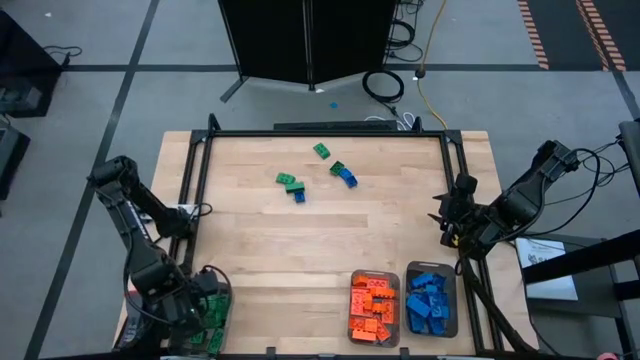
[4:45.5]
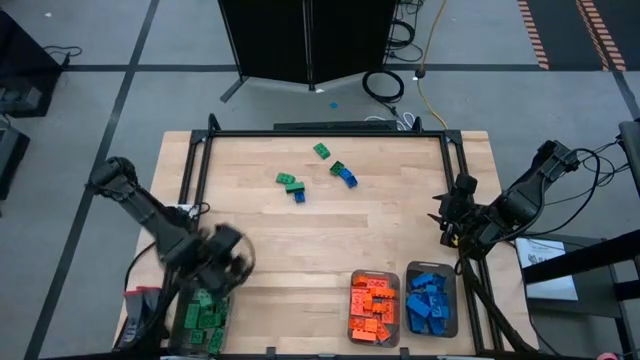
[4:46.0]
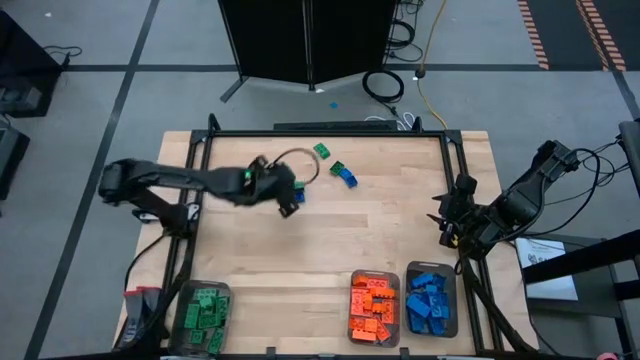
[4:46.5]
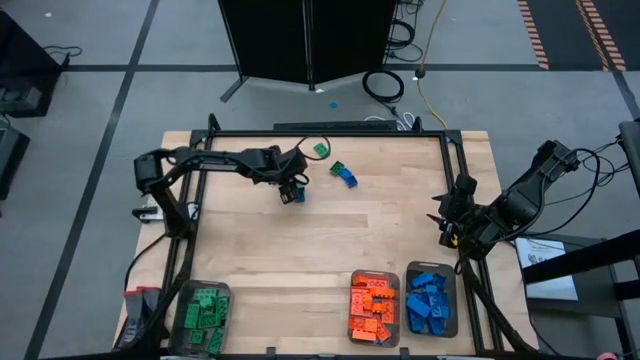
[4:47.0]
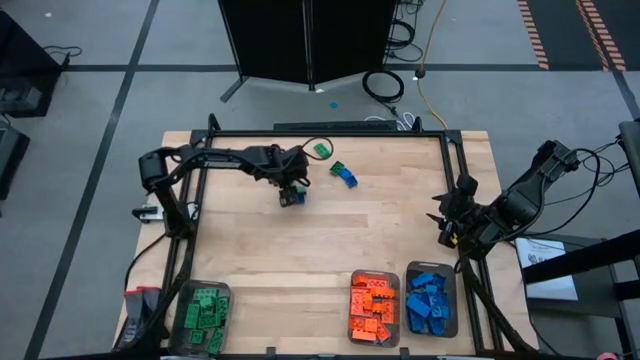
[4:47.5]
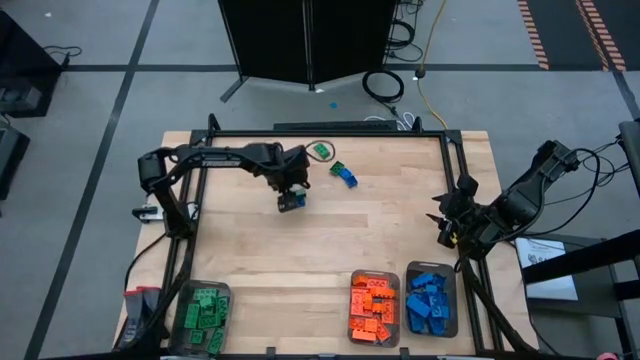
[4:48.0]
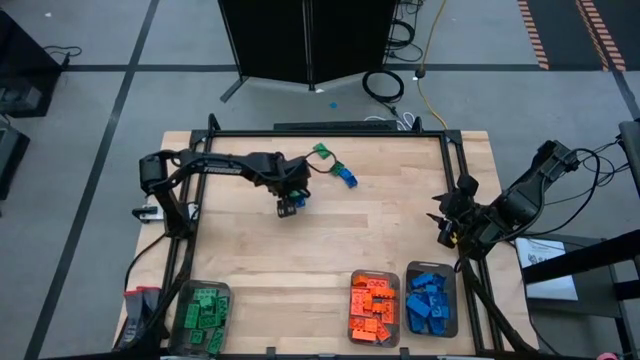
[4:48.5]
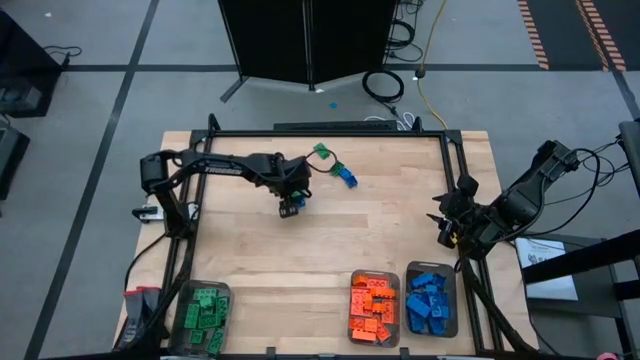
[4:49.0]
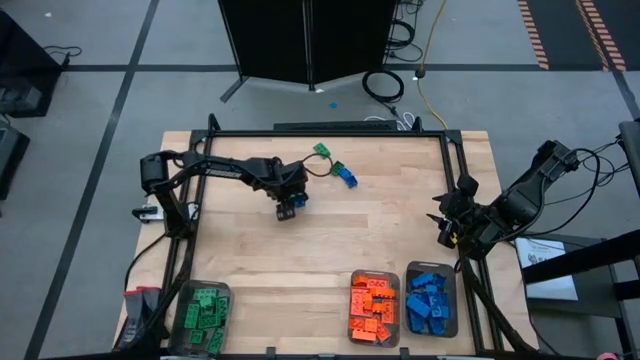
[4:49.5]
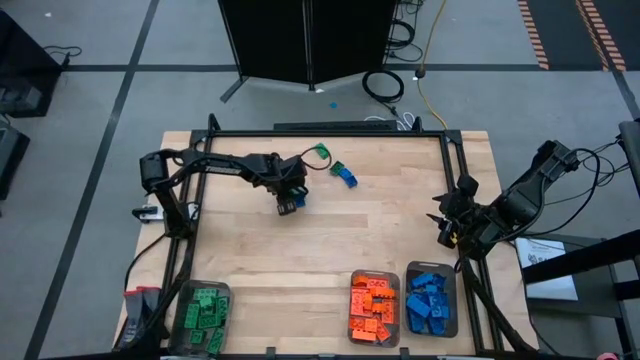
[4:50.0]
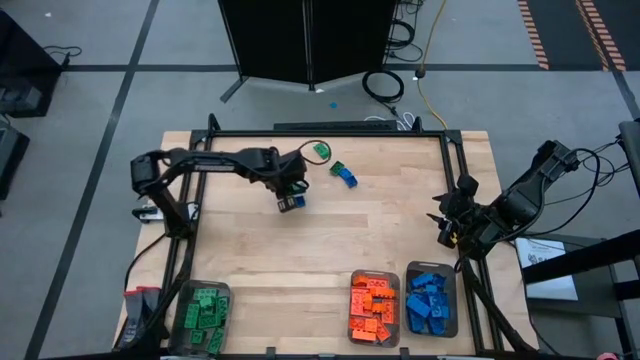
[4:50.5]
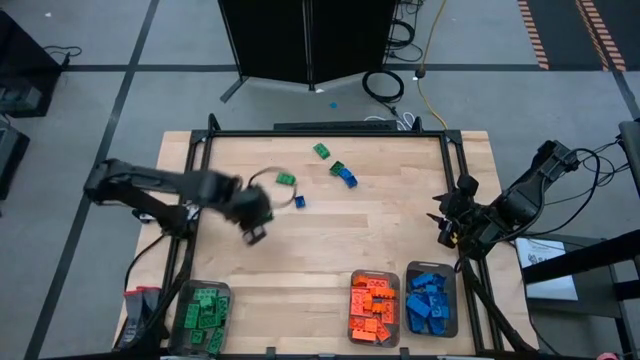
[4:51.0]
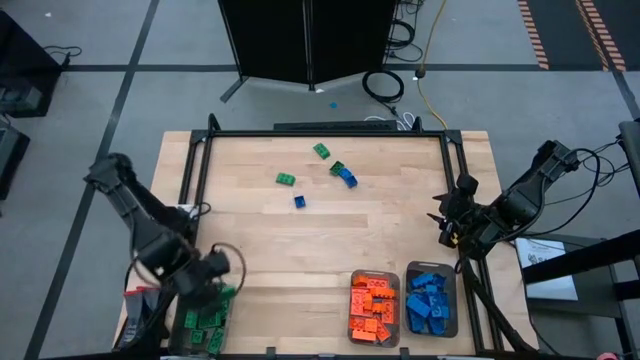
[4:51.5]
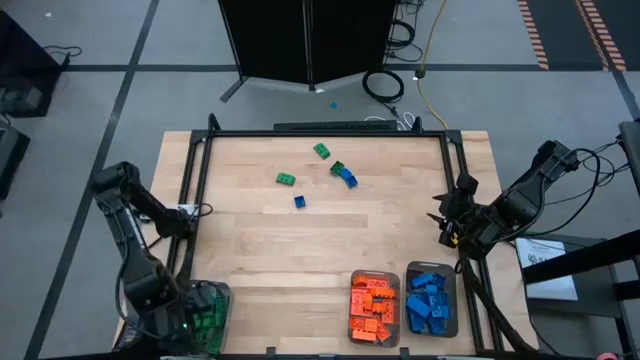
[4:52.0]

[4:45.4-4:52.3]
Task: Sort blocks
Put the green game piece into the left black bin

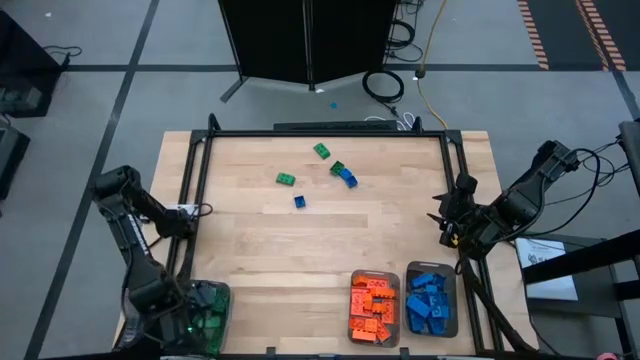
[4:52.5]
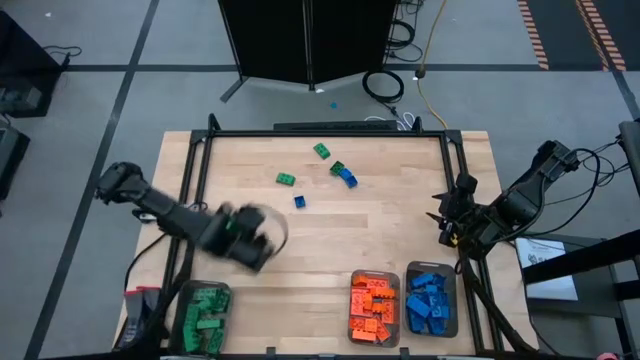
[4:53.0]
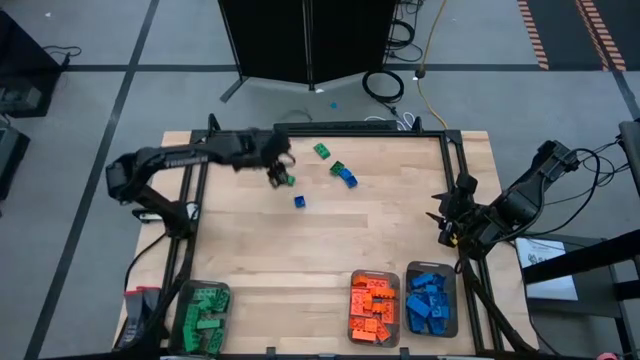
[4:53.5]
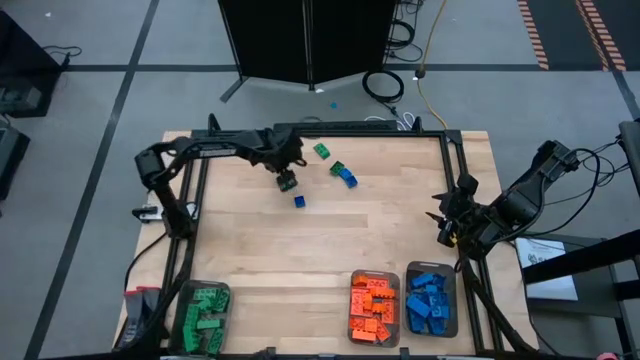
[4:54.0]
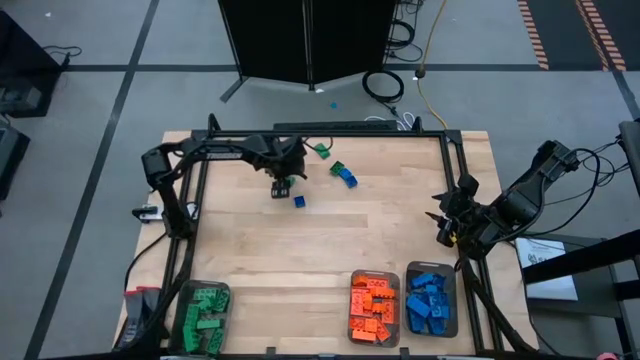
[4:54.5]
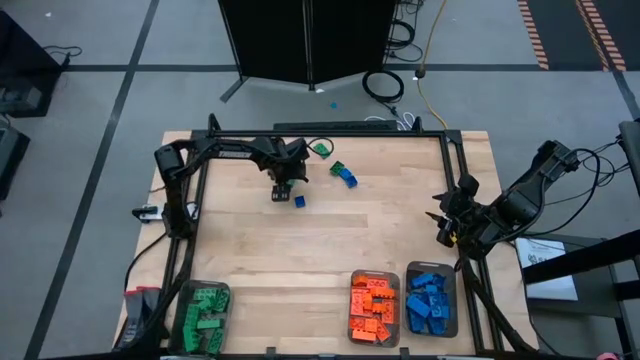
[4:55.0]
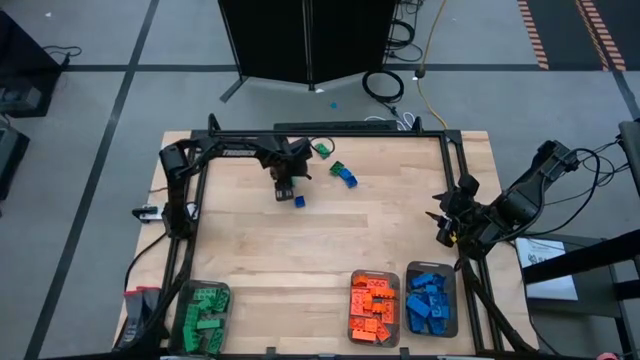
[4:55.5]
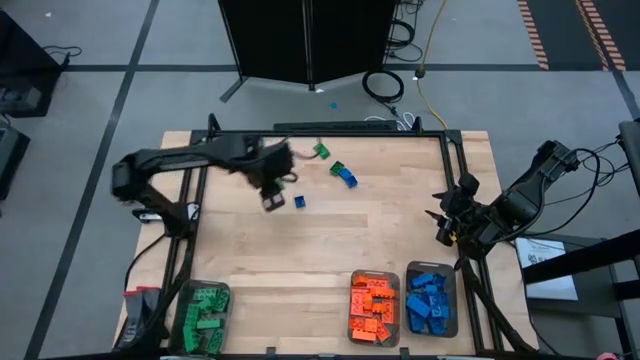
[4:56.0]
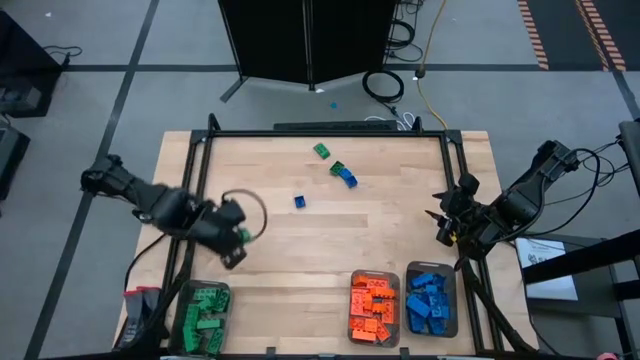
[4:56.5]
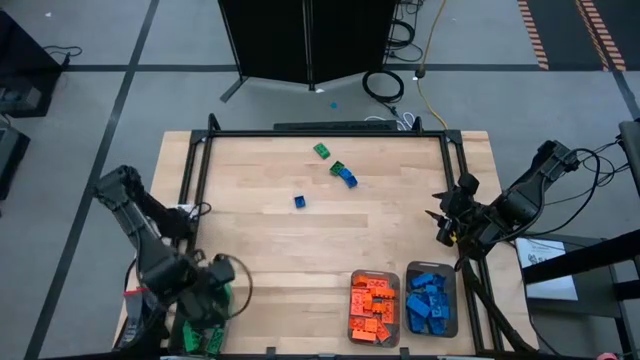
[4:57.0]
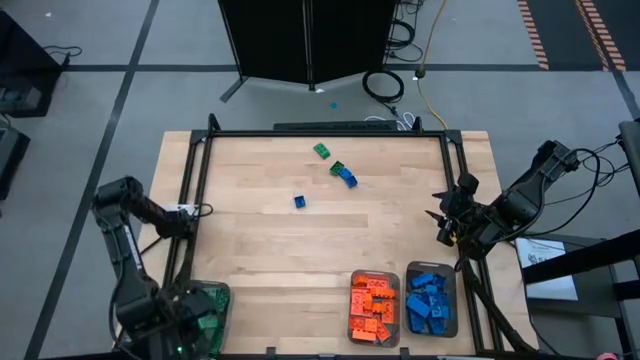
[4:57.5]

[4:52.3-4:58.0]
Put the green game piece into the left black bin

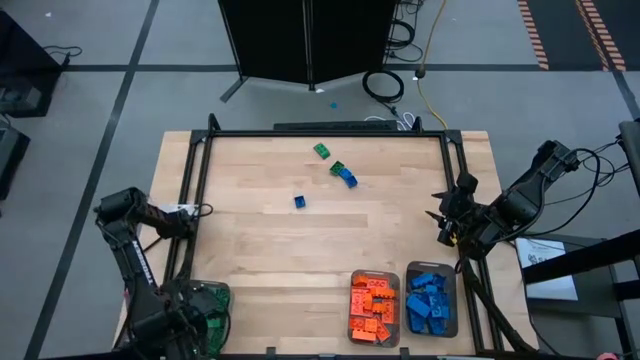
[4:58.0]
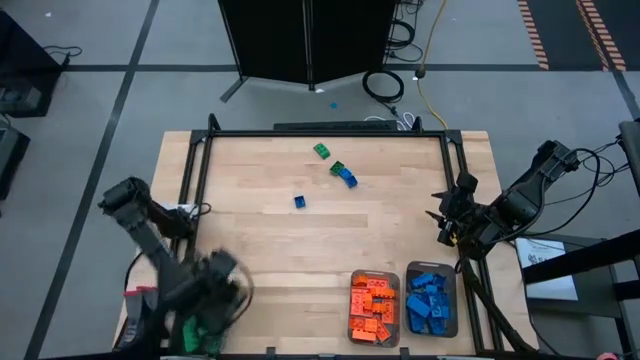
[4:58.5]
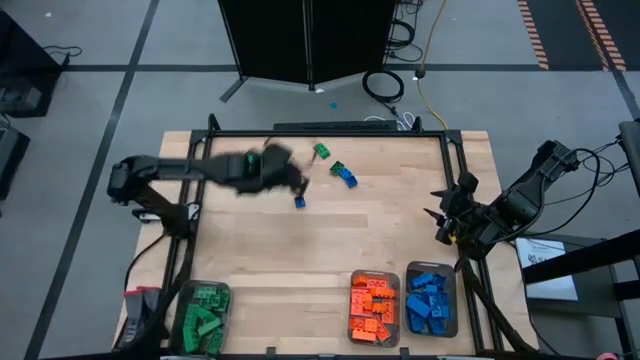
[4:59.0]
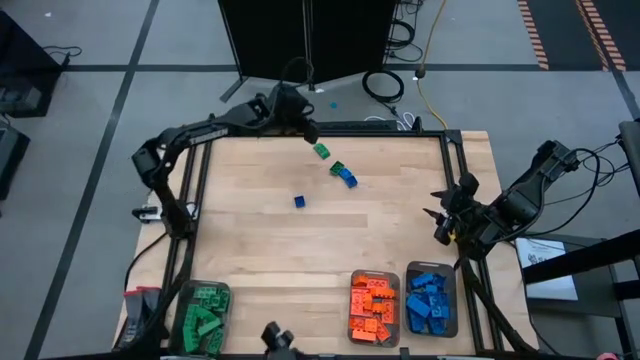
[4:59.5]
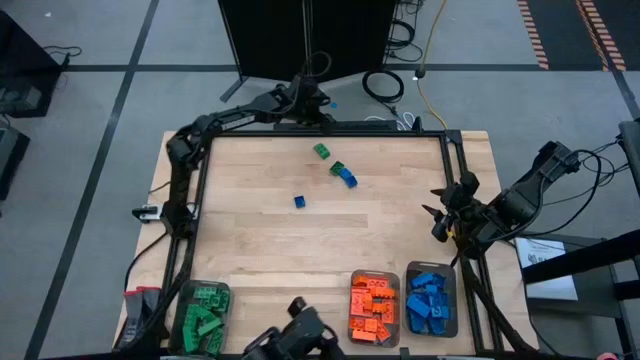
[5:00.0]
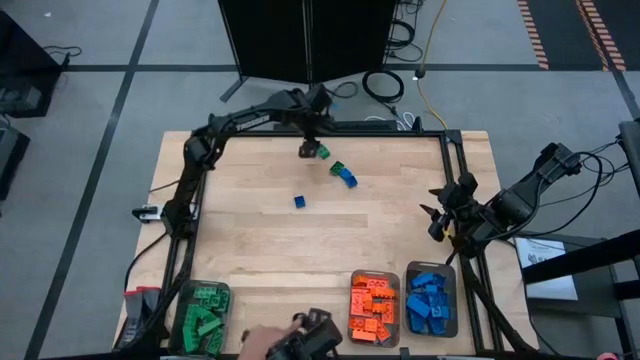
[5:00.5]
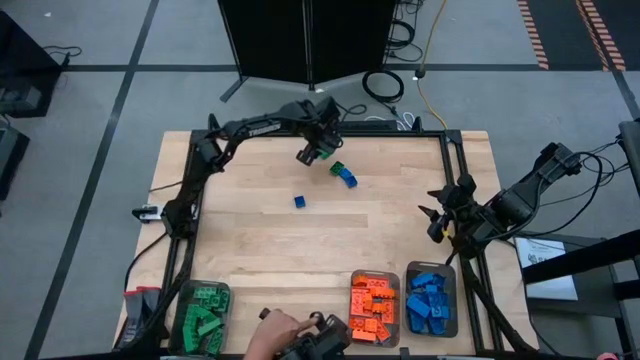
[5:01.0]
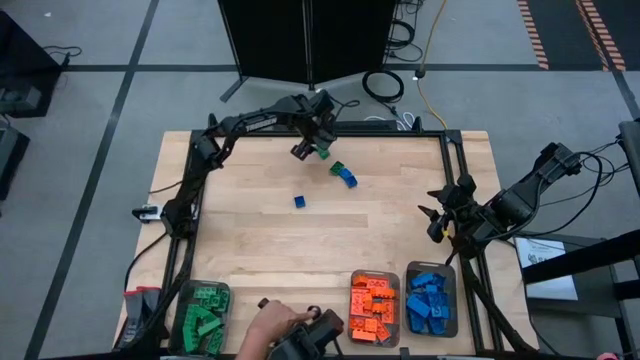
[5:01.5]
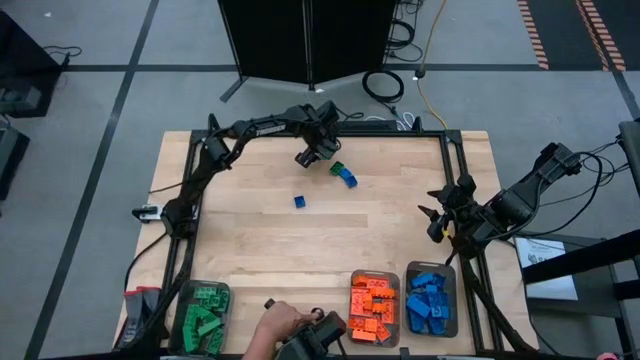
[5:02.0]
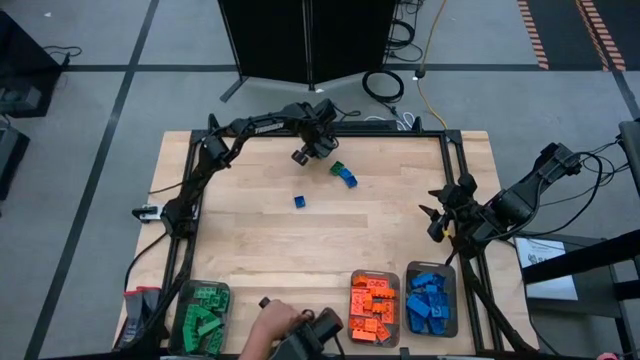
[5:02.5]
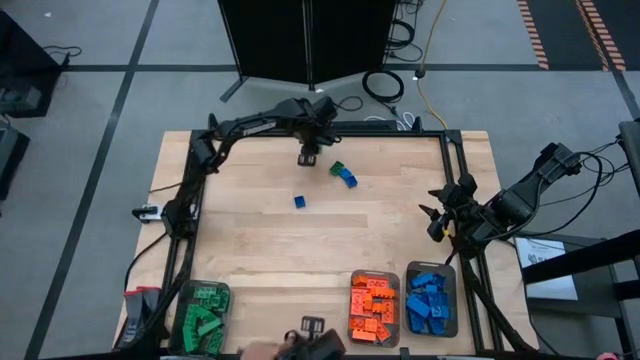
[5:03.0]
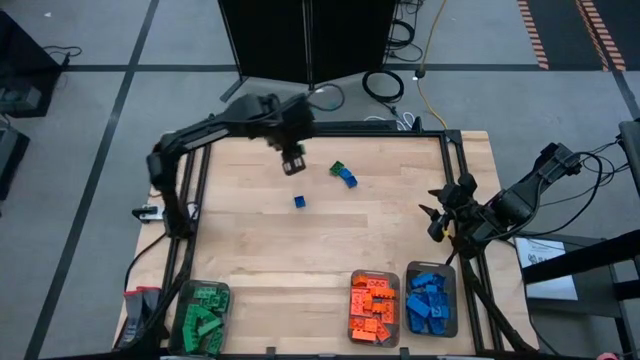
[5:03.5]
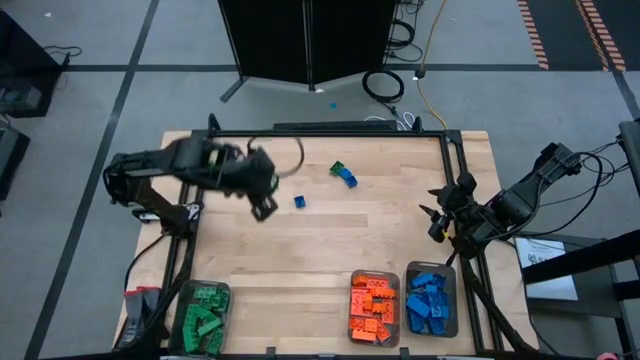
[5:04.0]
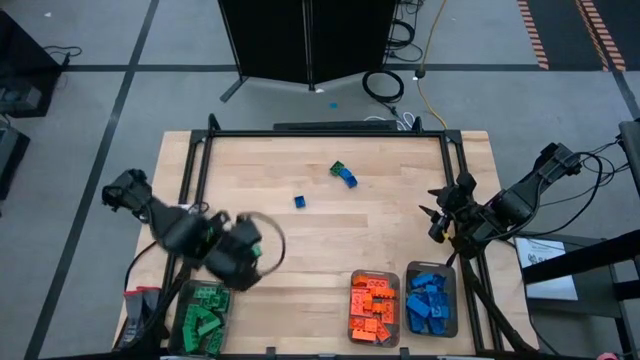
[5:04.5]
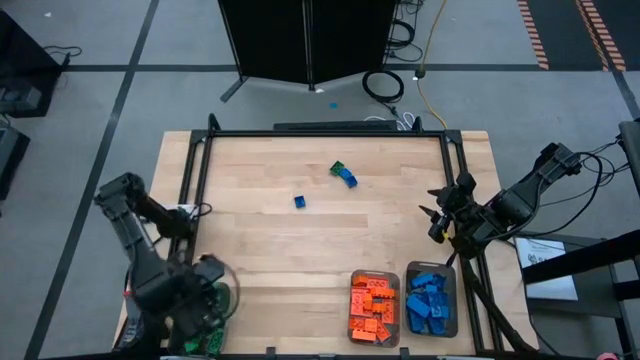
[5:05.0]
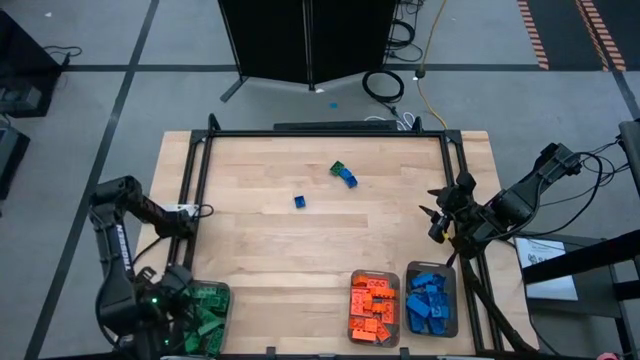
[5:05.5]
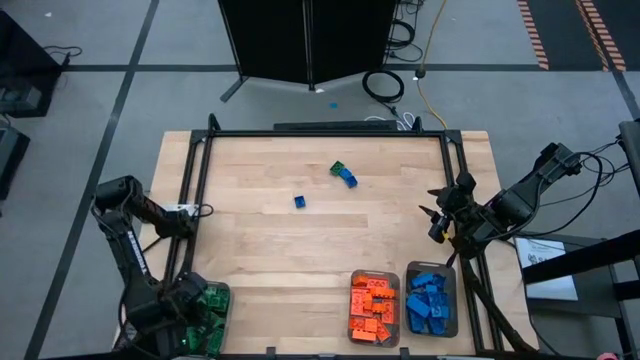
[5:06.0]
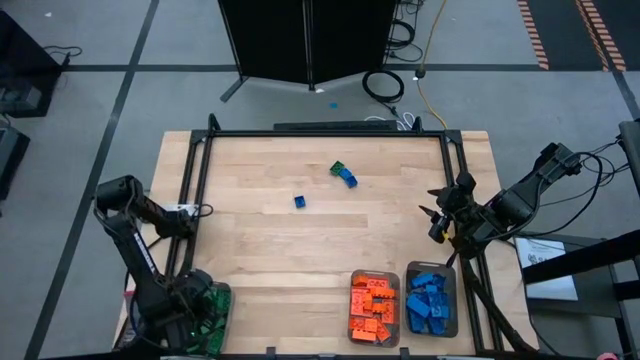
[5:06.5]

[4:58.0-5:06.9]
Put the green game piece into the left black bin
